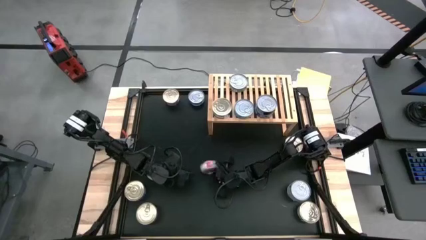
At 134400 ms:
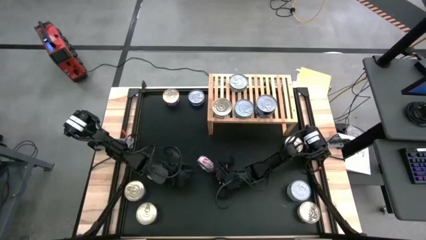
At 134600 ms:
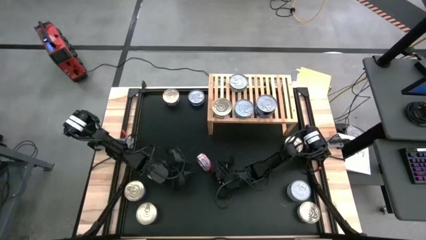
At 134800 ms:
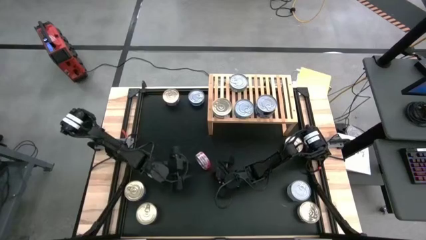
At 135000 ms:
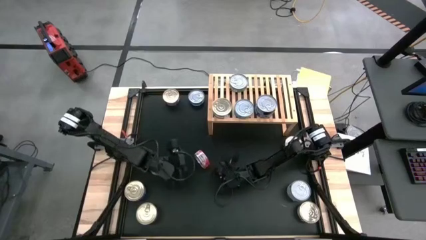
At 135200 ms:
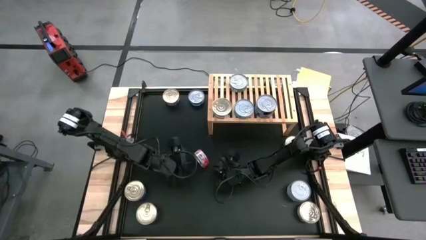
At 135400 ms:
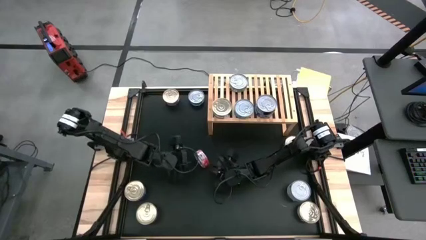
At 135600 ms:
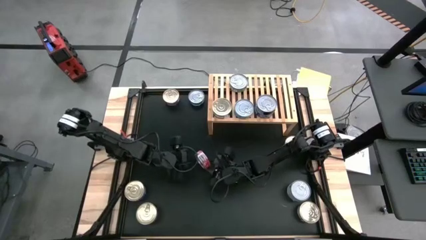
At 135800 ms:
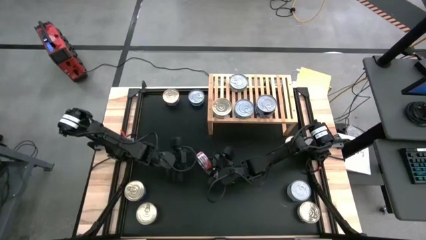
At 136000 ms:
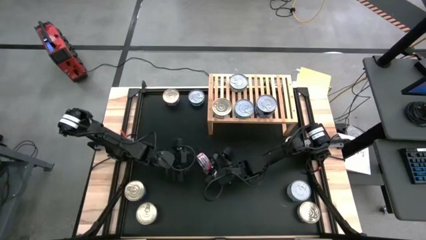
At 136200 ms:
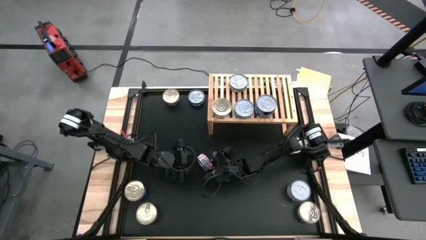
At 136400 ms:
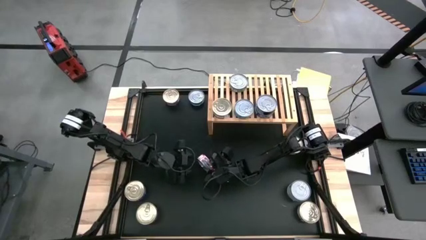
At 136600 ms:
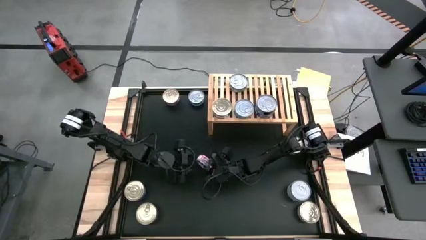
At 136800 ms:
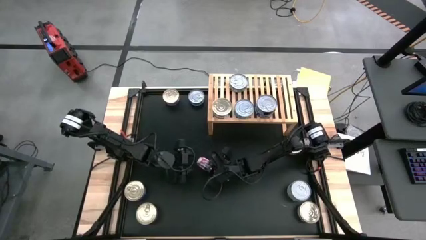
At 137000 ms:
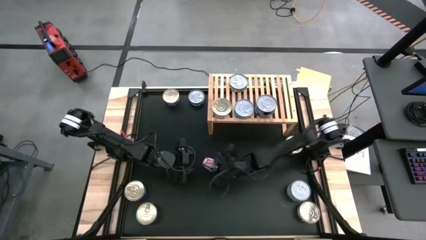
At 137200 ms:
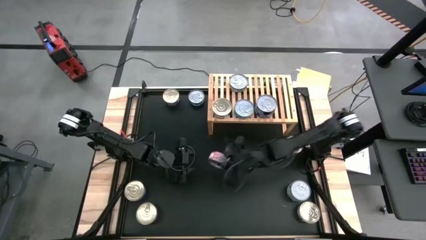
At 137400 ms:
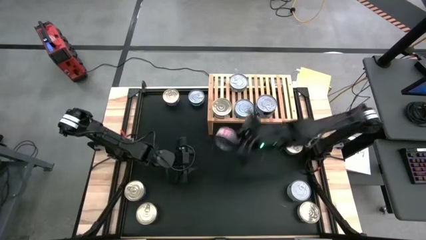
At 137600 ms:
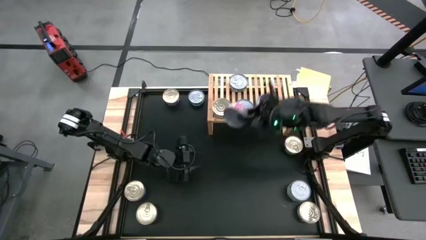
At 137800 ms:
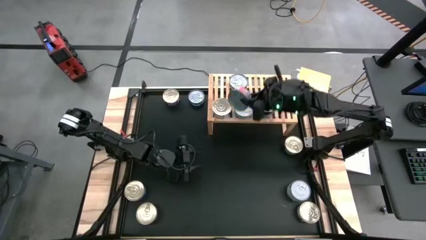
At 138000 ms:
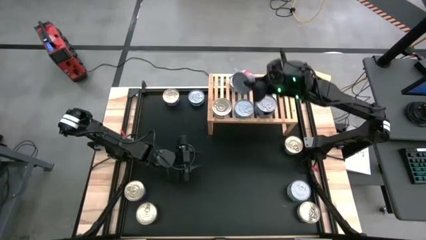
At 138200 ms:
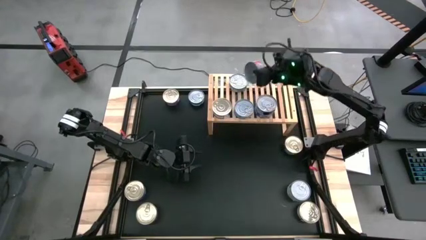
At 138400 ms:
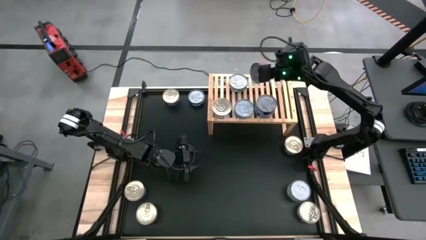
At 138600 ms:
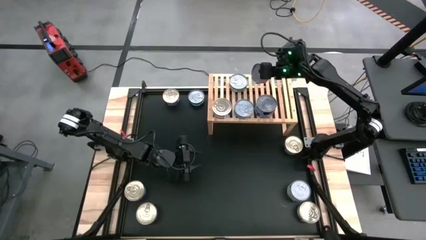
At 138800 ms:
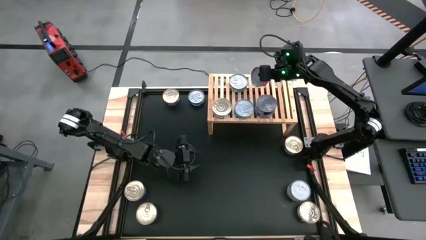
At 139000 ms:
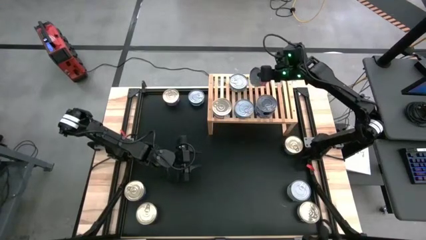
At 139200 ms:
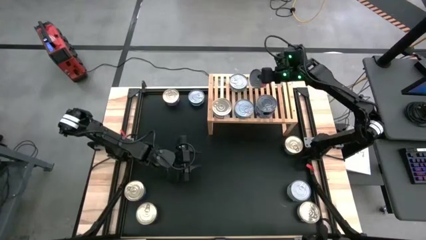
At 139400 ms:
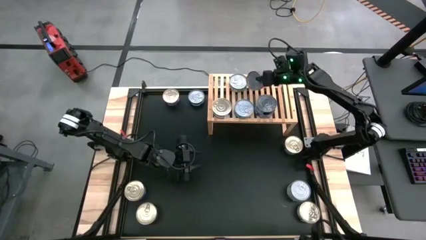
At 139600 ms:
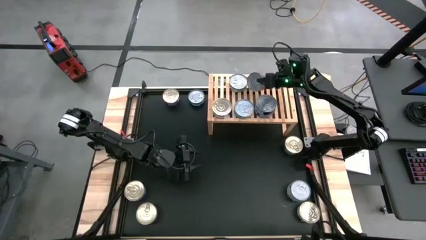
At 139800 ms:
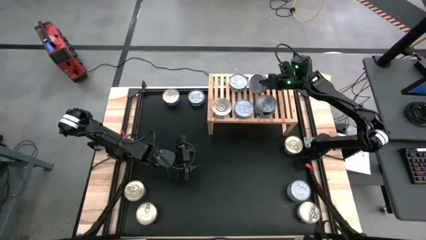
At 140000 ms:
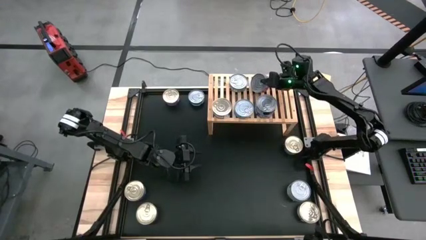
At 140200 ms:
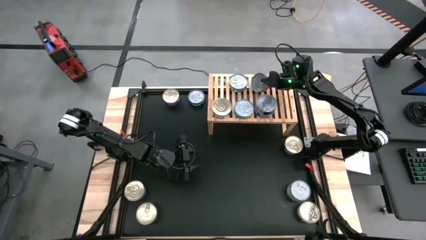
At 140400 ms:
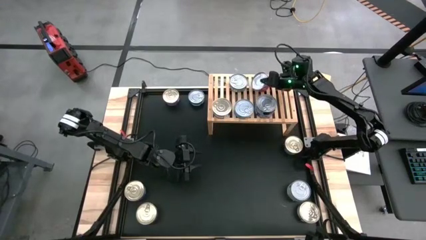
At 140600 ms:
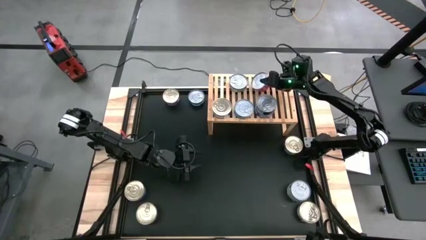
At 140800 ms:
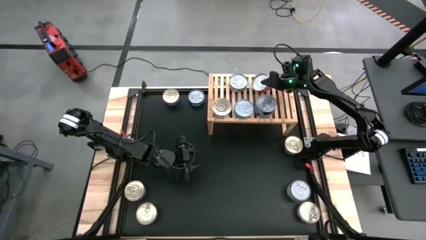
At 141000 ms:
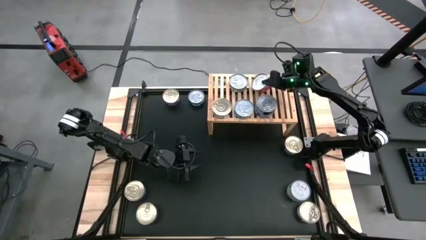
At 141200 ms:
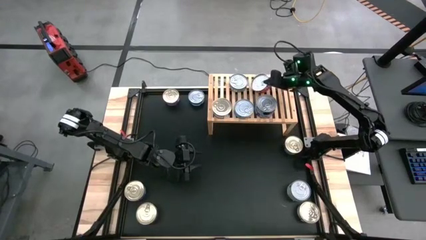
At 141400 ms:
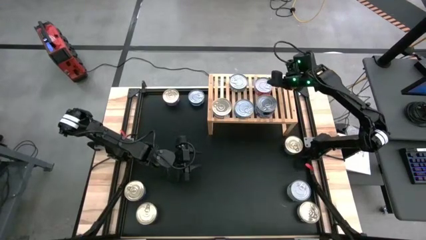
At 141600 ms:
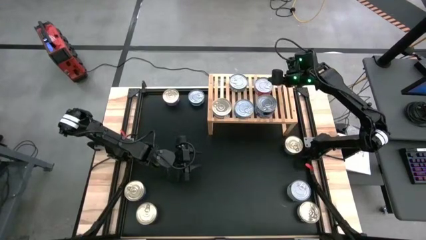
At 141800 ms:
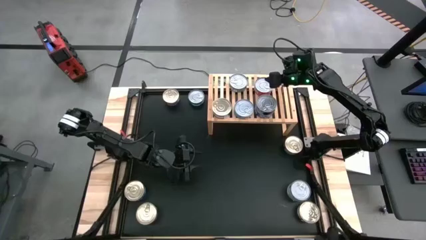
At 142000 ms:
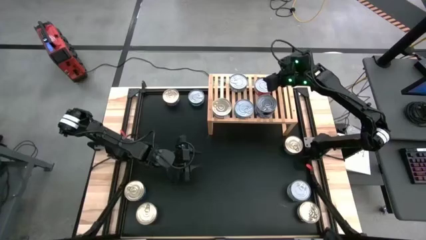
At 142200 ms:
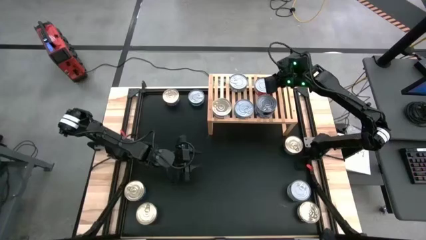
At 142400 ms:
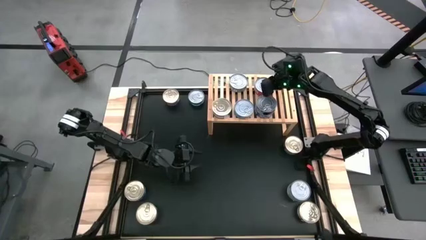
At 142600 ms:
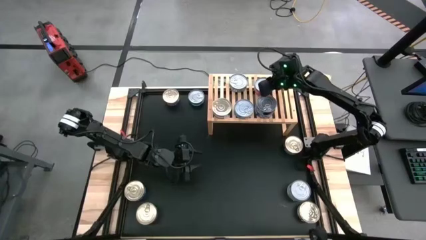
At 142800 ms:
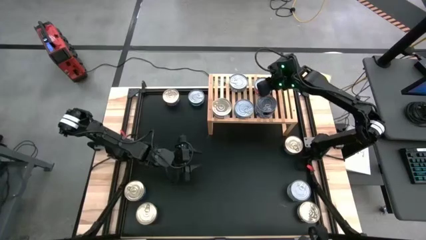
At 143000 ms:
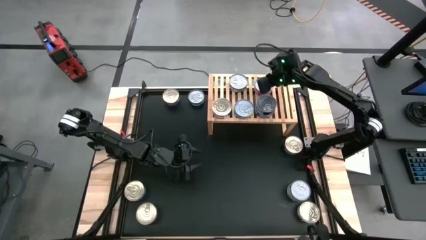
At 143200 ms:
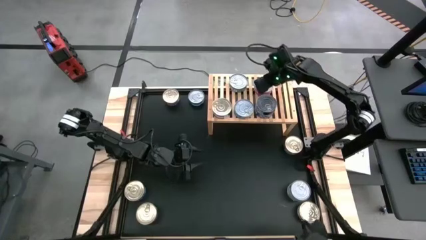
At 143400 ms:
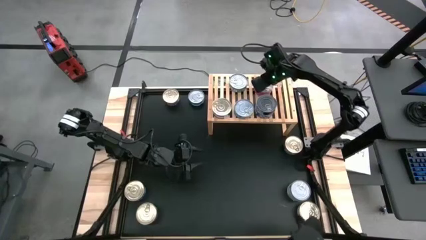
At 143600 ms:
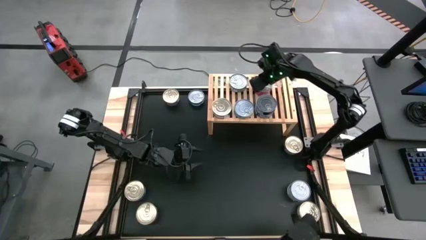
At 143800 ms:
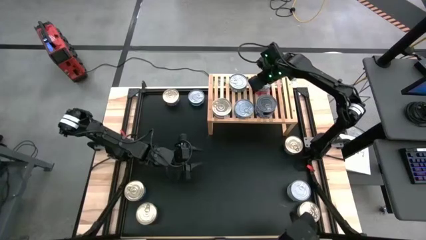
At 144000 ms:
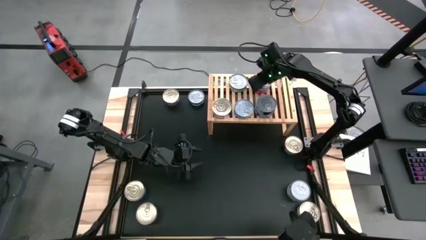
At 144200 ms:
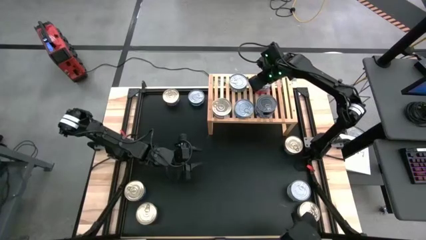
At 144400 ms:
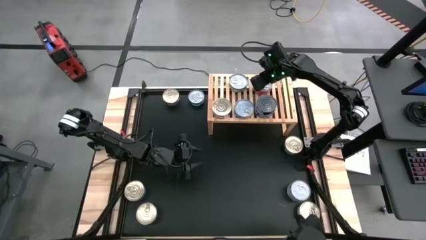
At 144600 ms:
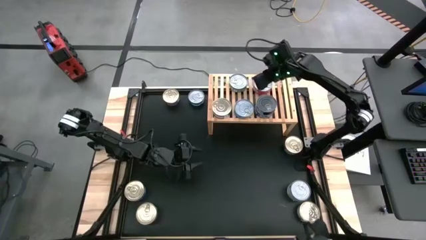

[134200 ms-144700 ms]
Task: Stack canned seafood by type on shelf
Put the red tuna can on the shelf
